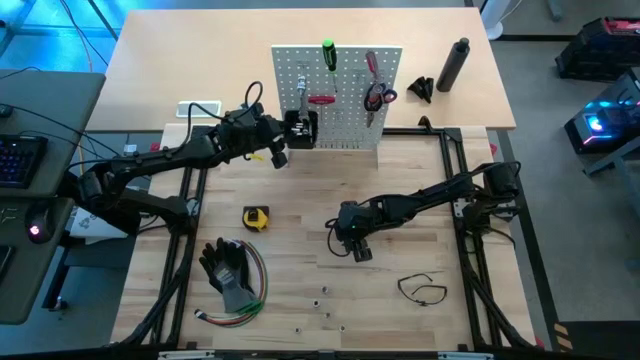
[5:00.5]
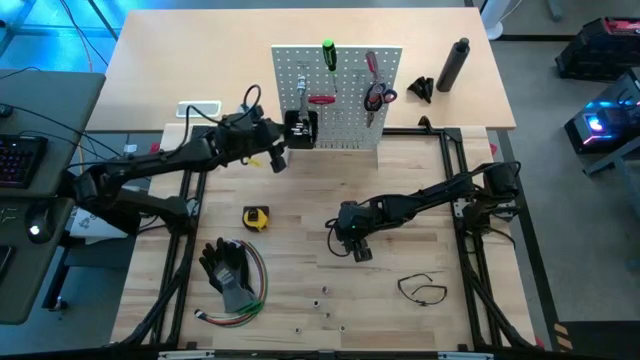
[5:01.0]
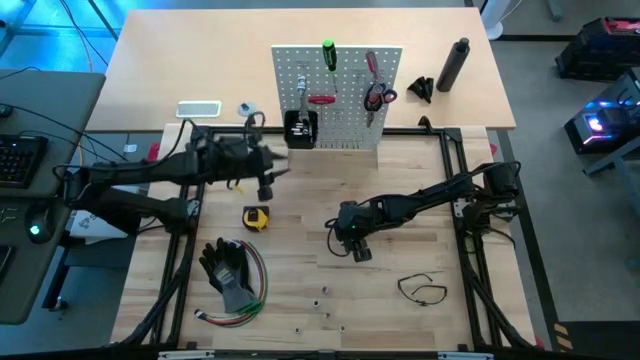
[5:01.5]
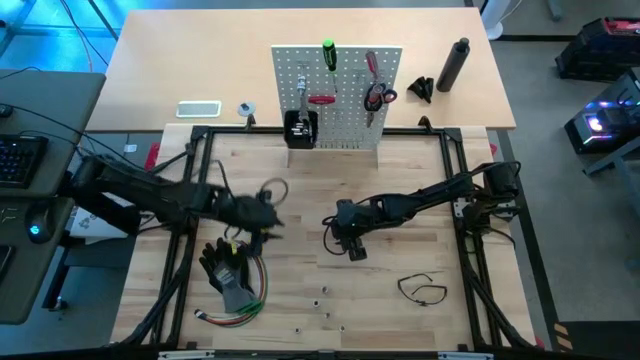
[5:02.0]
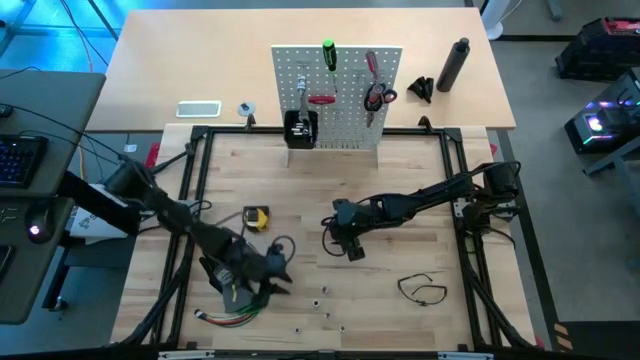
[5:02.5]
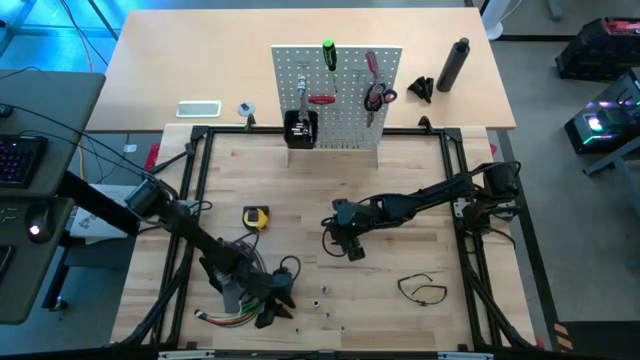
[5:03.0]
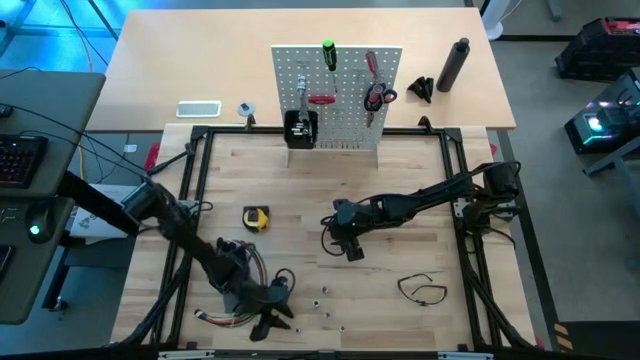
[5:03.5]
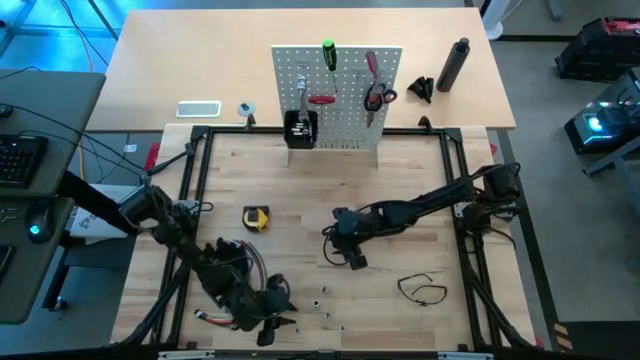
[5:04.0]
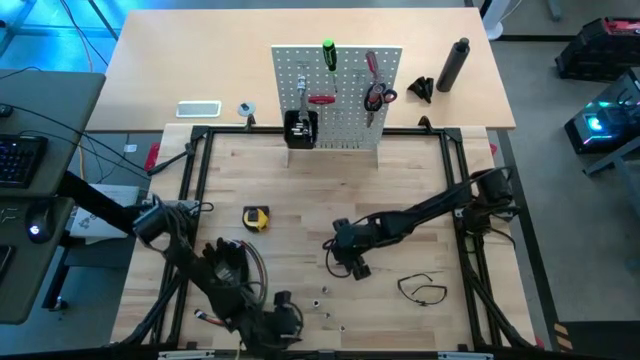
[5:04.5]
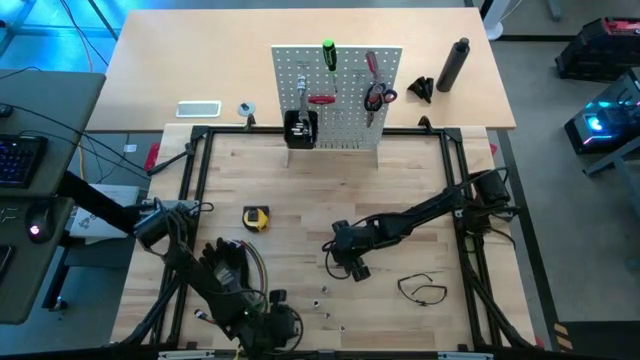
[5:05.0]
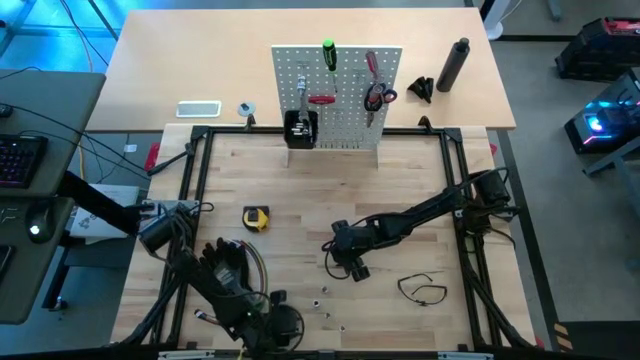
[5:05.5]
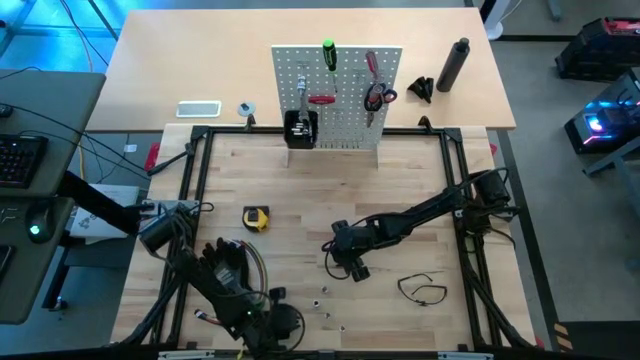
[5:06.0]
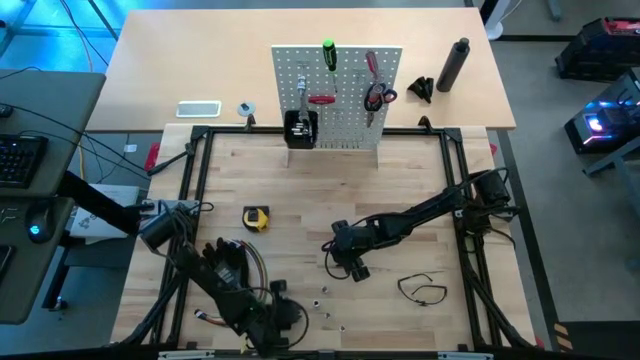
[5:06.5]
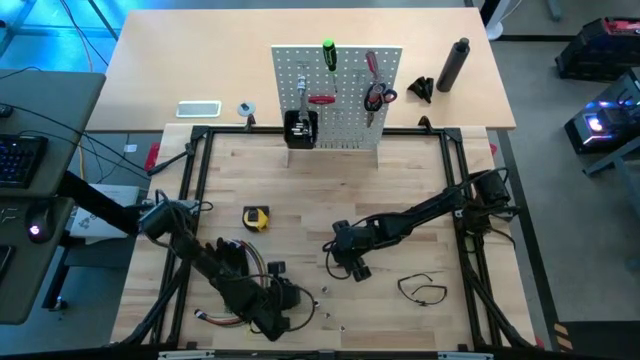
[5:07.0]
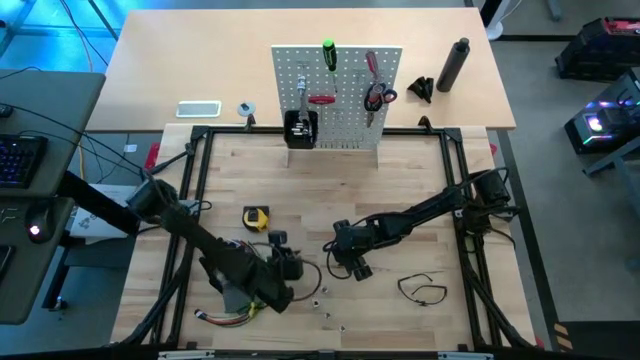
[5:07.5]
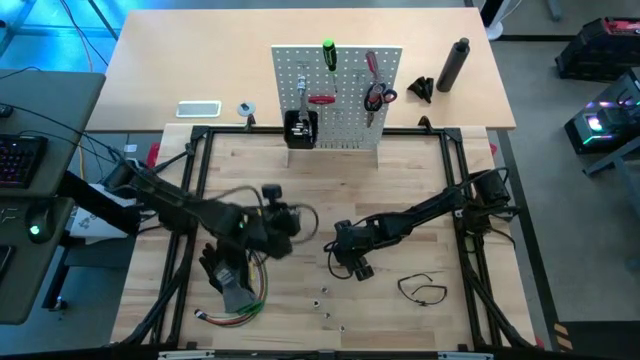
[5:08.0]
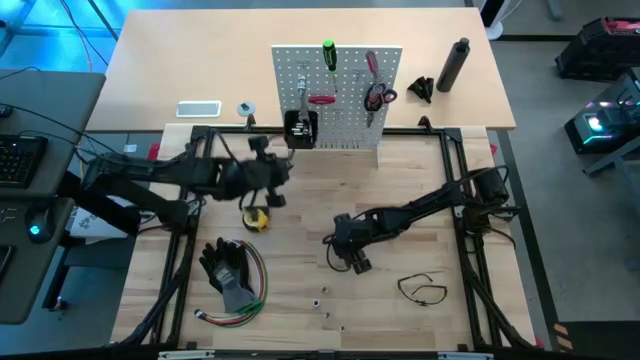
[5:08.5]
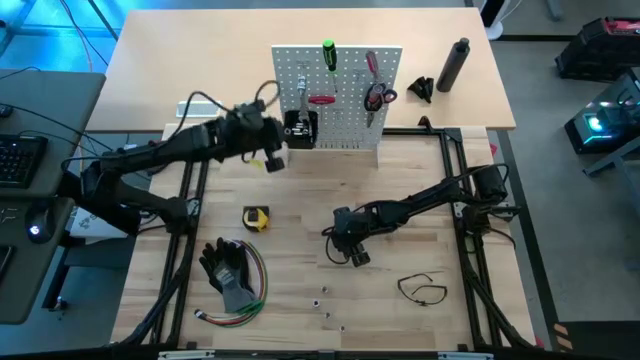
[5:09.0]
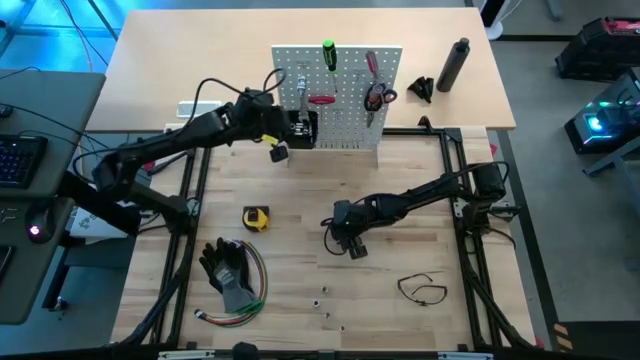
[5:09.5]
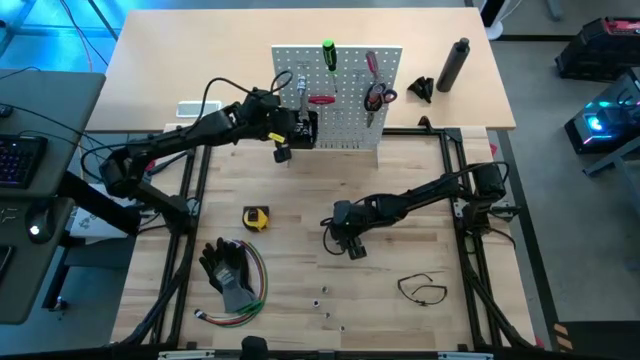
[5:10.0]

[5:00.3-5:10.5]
Task: Hang tools onto peg board
Put the silver socket into the black bin on the white peg board

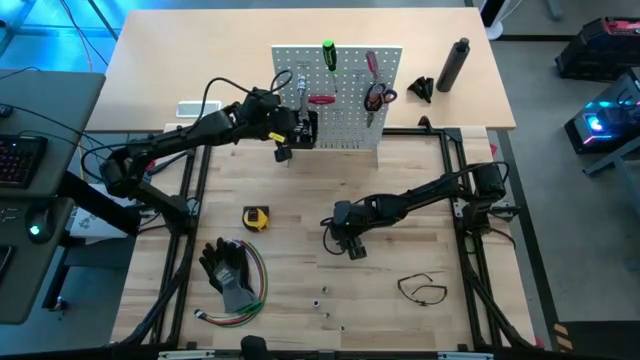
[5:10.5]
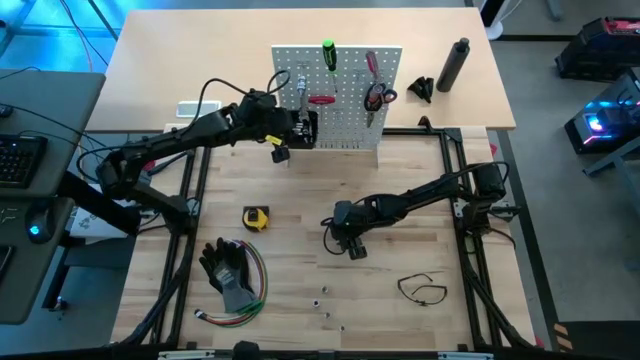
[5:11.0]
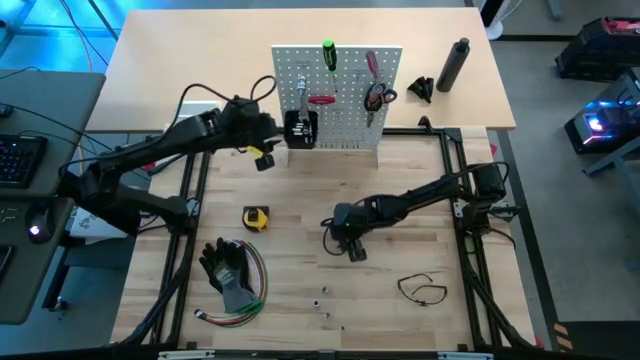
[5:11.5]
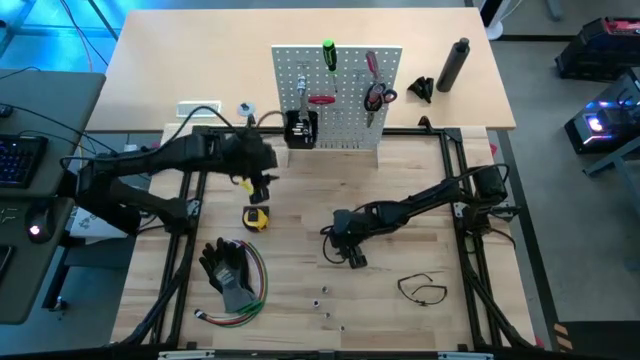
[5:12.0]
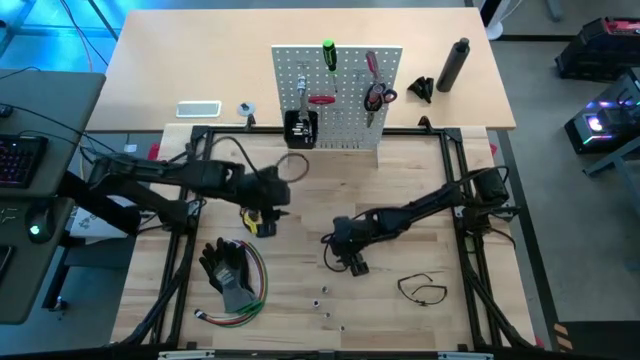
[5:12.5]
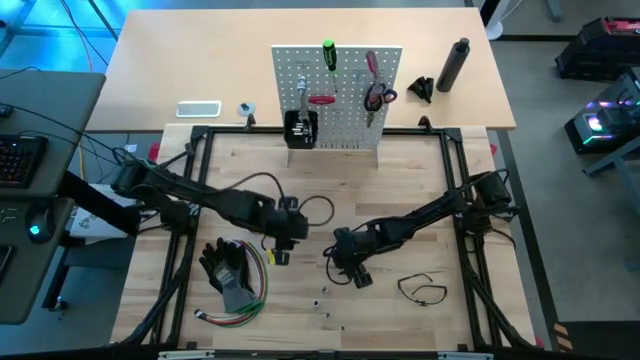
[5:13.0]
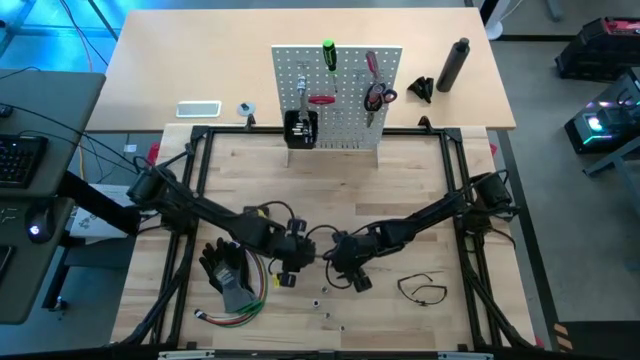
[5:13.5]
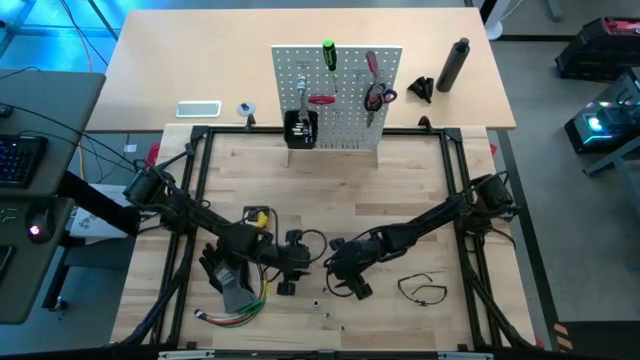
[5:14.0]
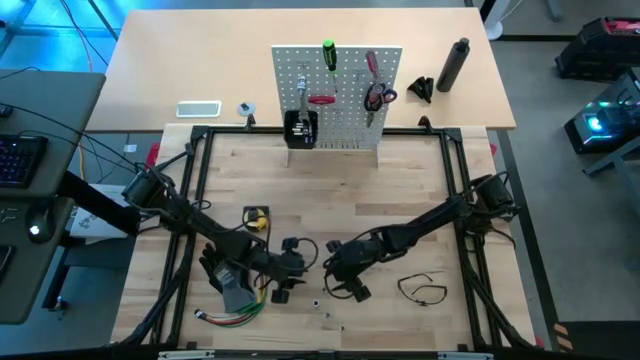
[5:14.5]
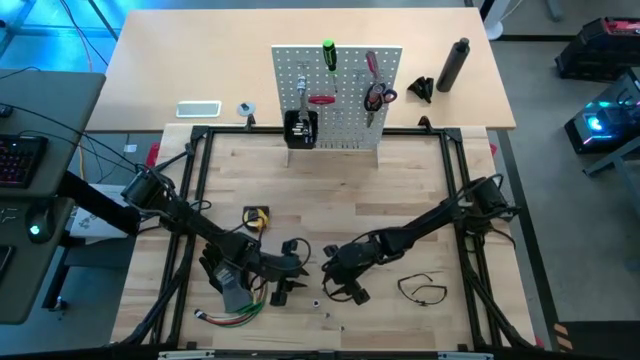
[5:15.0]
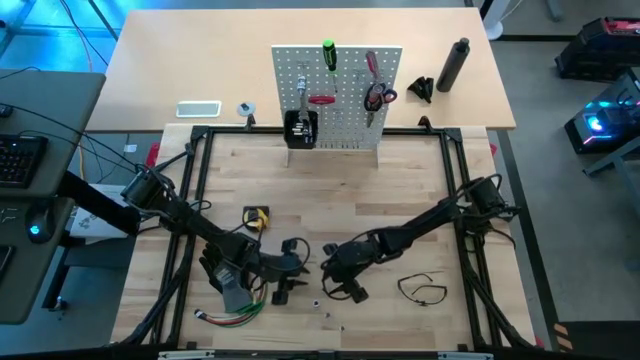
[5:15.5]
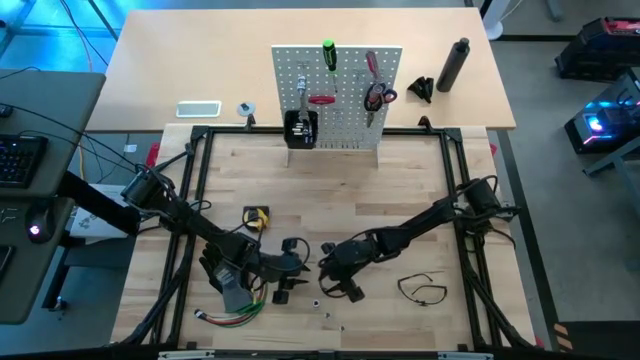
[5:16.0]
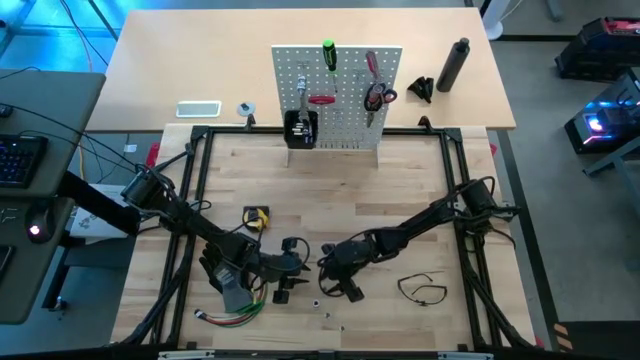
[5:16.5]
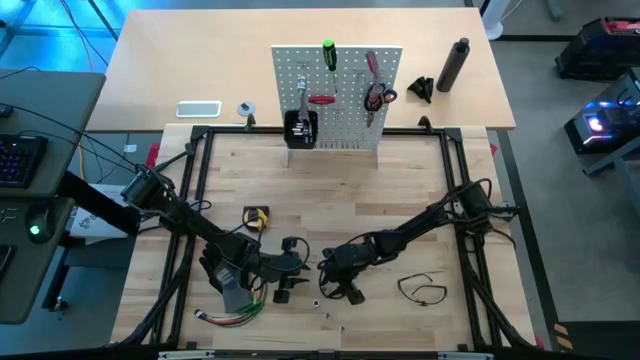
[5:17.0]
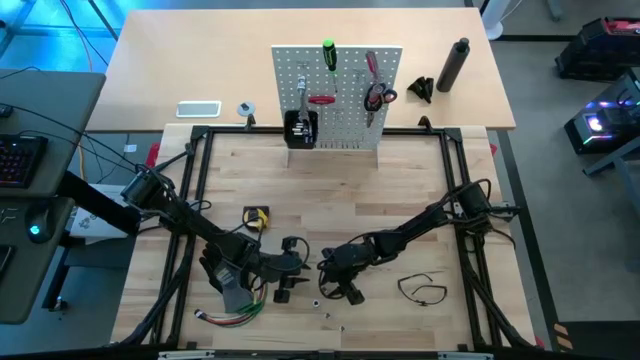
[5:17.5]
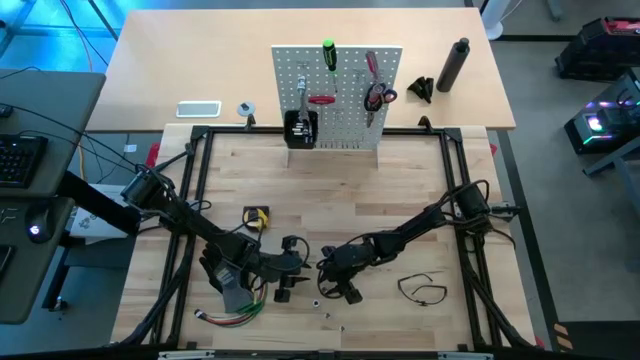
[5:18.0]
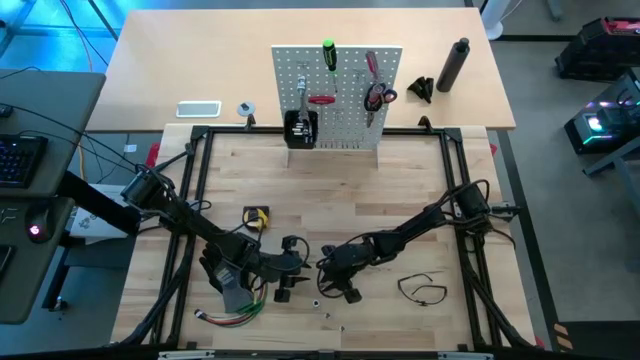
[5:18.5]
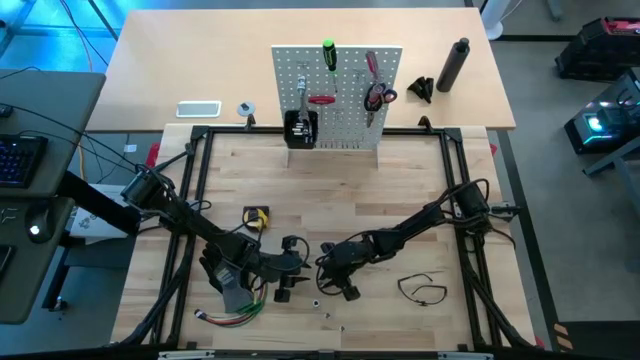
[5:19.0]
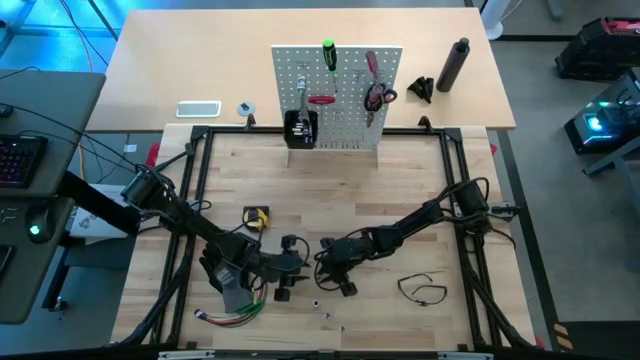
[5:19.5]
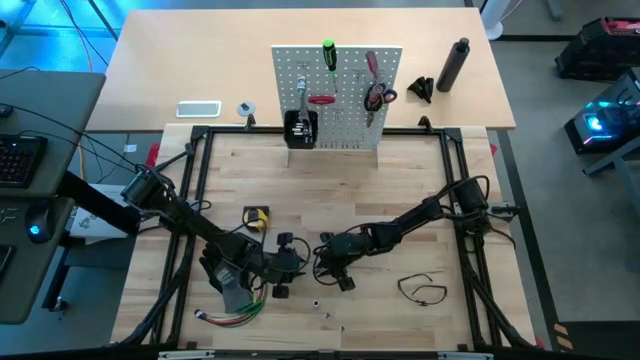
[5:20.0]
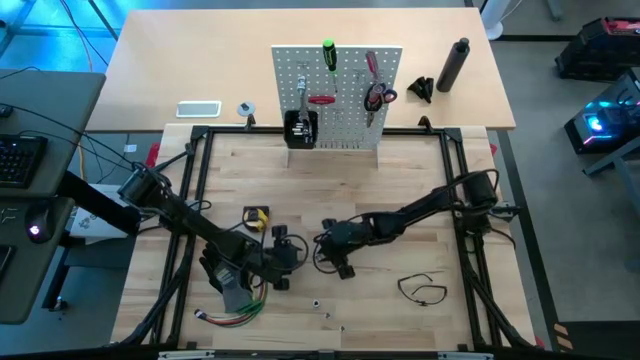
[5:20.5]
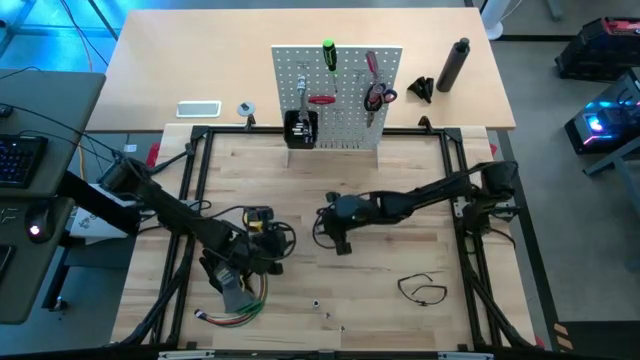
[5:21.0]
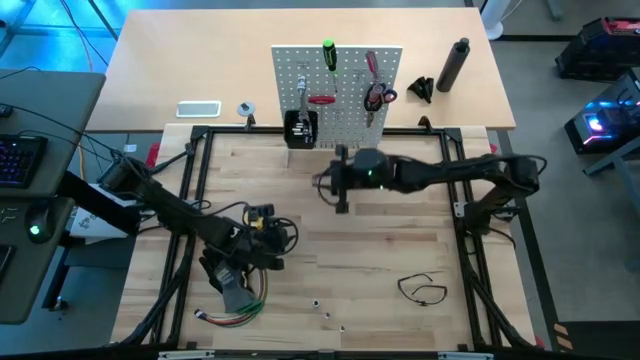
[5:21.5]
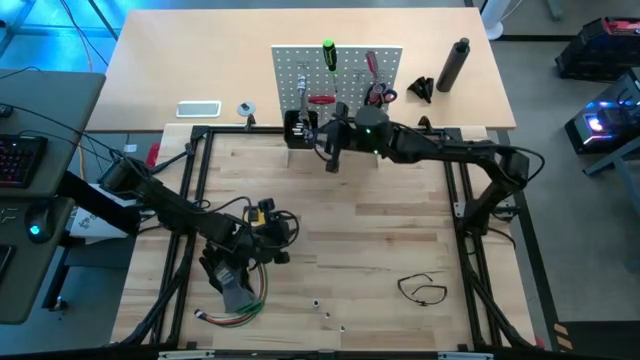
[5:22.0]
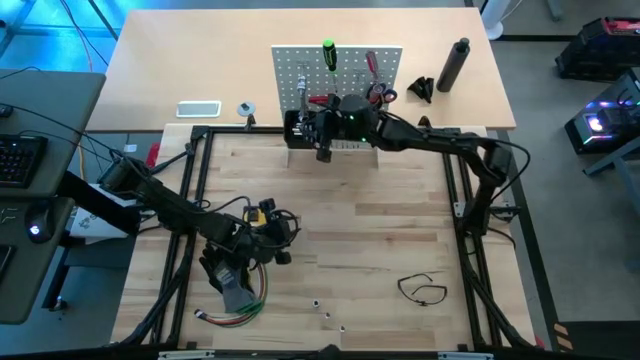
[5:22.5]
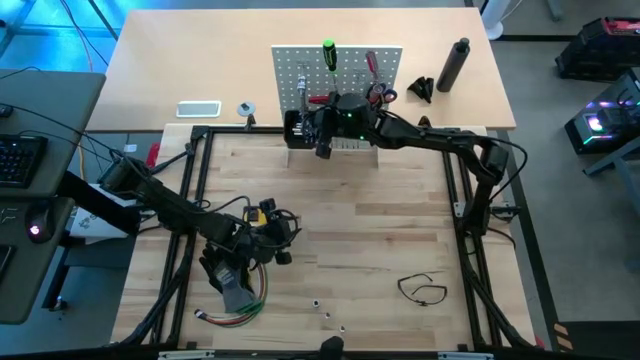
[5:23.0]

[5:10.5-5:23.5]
Put the silver socket into the black bin on the white peg board
